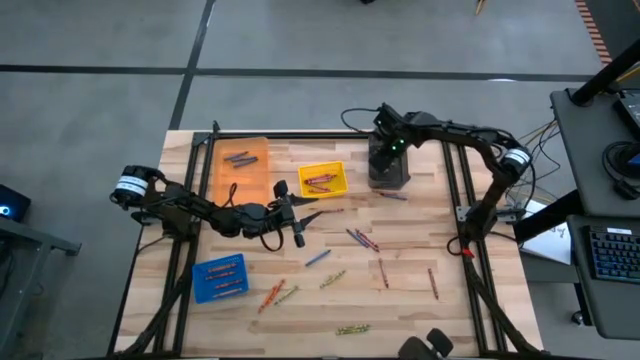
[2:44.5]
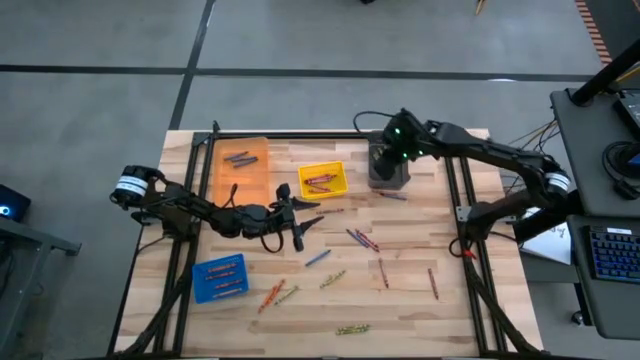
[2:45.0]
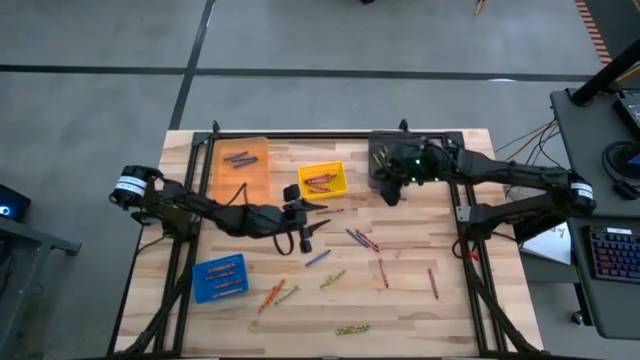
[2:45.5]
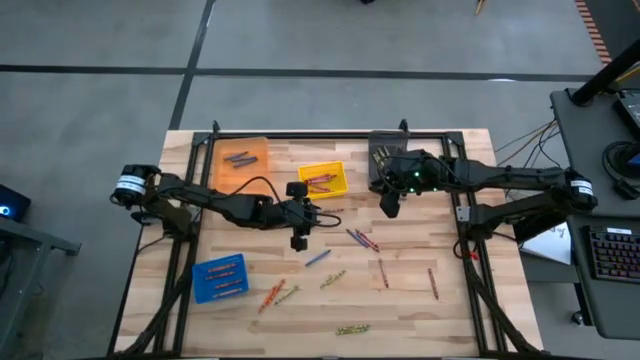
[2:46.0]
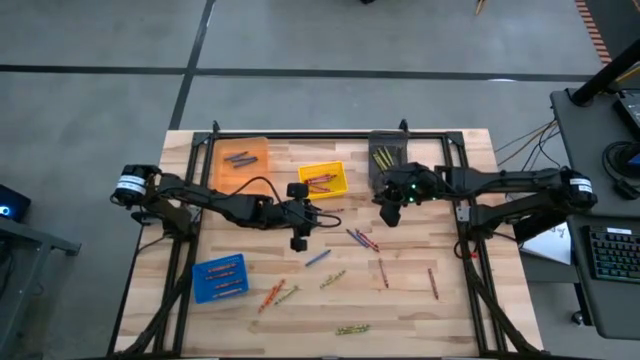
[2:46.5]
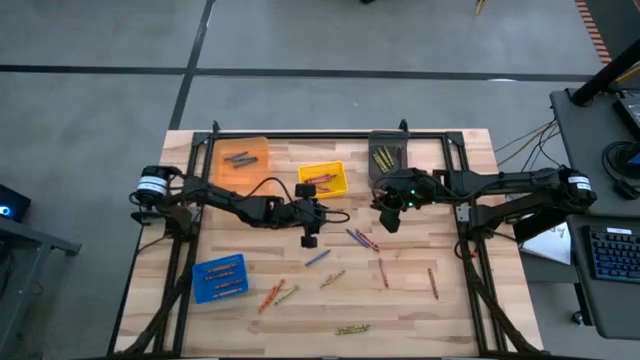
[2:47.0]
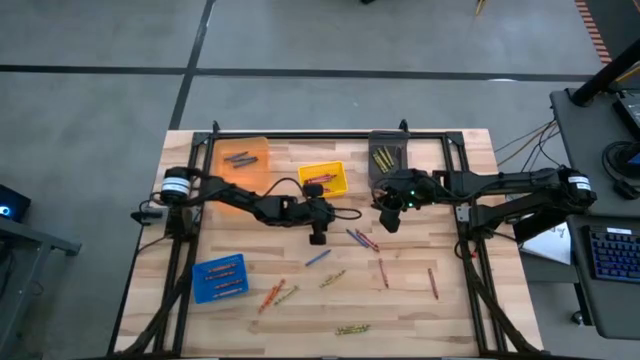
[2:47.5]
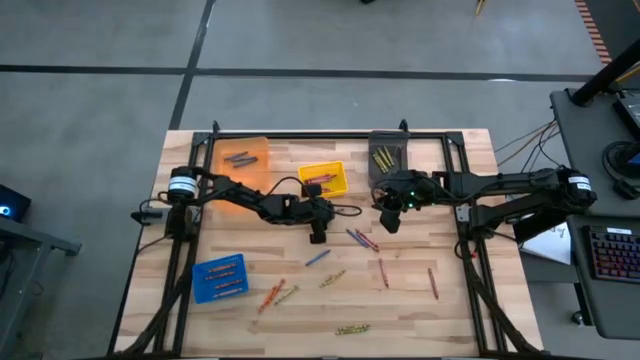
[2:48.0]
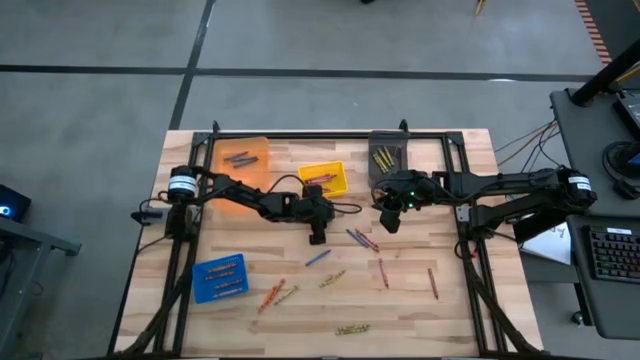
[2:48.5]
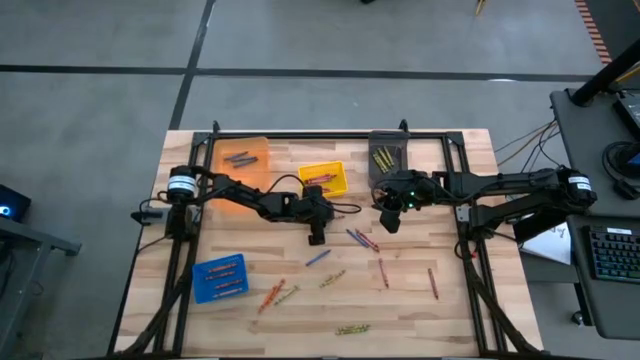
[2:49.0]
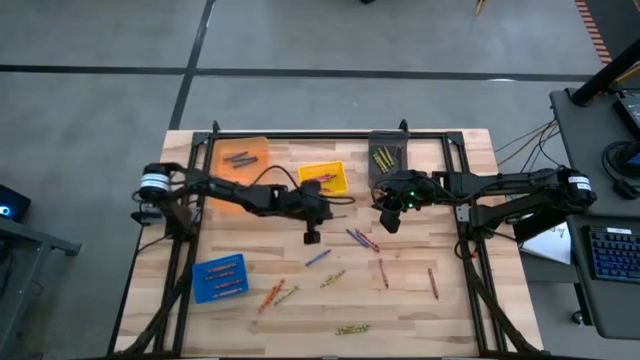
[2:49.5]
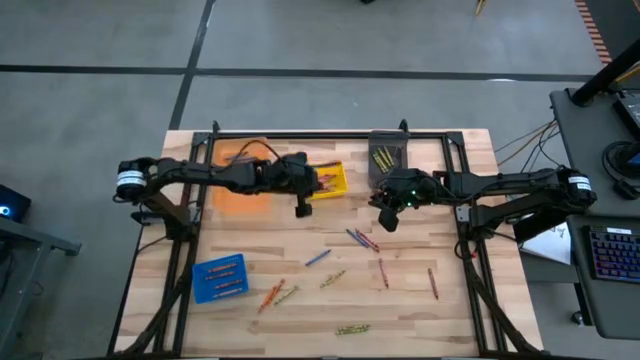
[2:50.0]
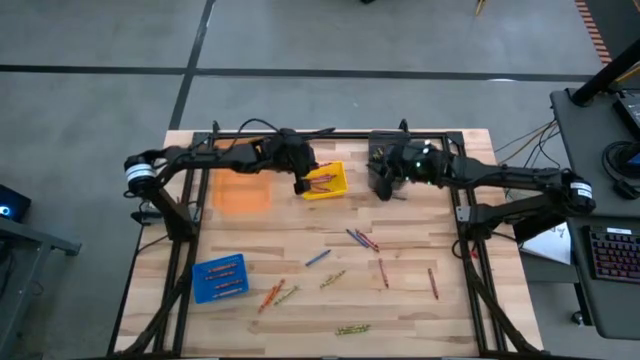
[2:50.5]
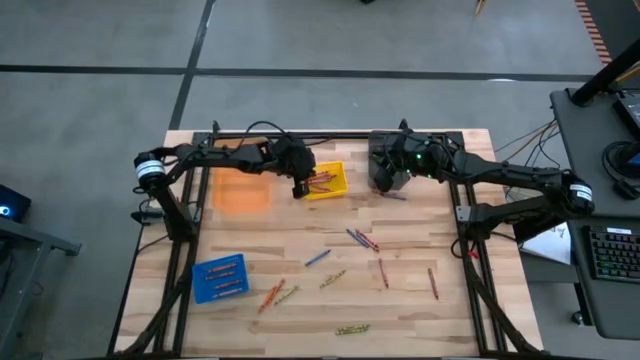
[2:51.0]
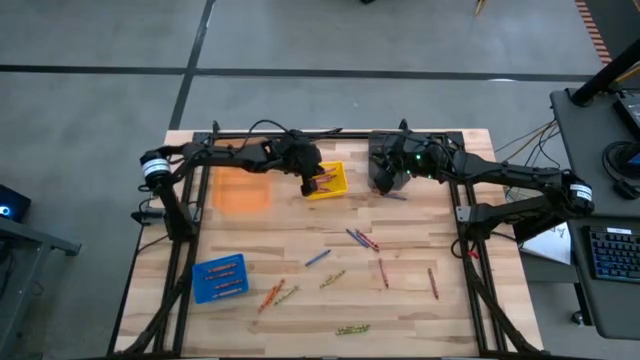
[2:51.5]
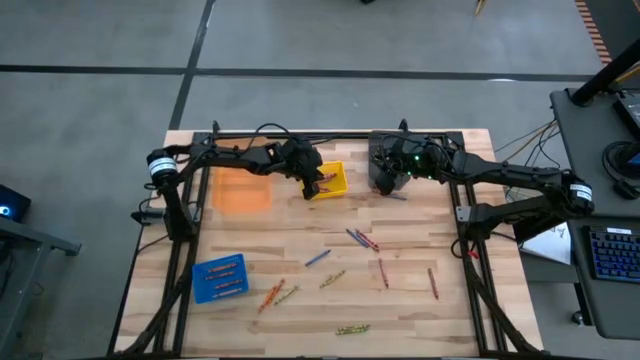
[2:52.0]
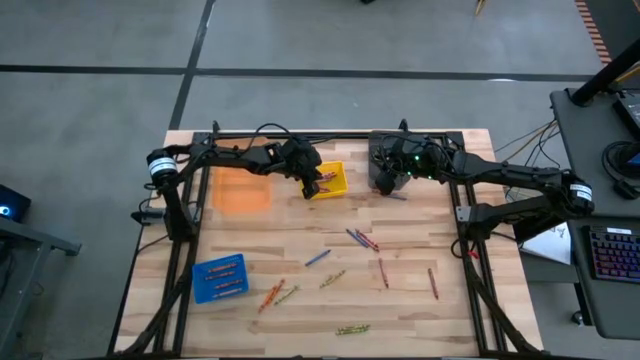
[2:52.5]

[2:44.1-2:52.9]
Task: Sort crayons
Put the red crayon into the yellow bin

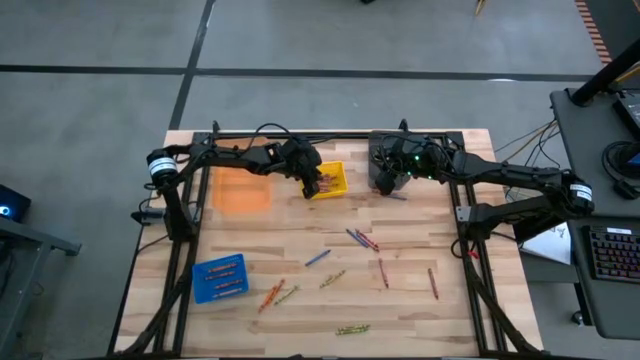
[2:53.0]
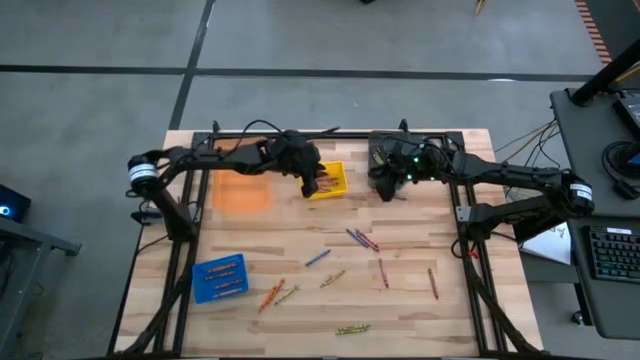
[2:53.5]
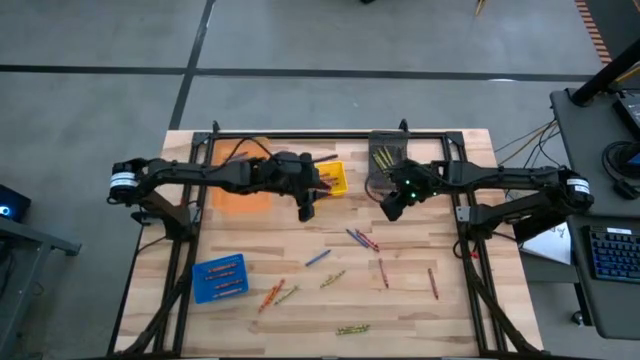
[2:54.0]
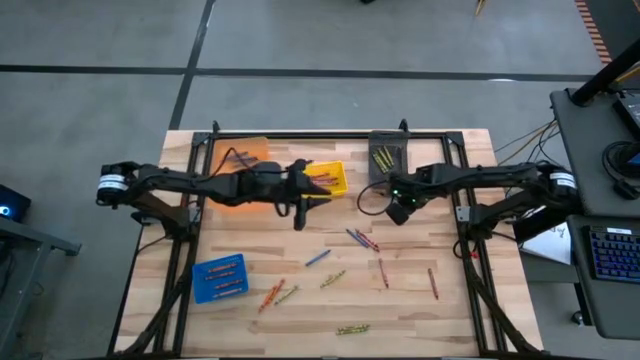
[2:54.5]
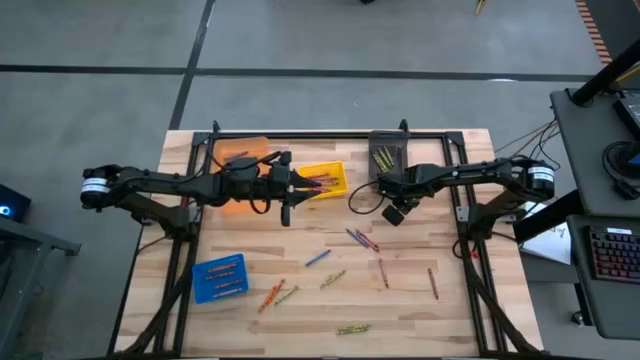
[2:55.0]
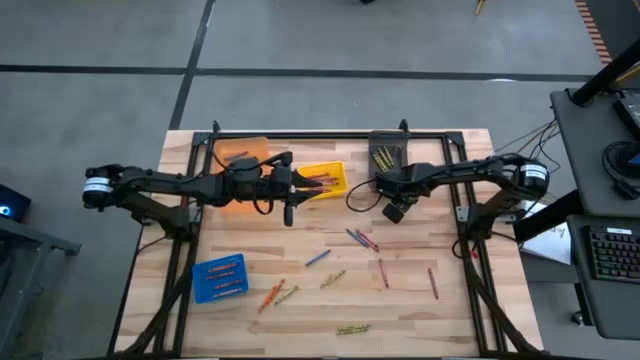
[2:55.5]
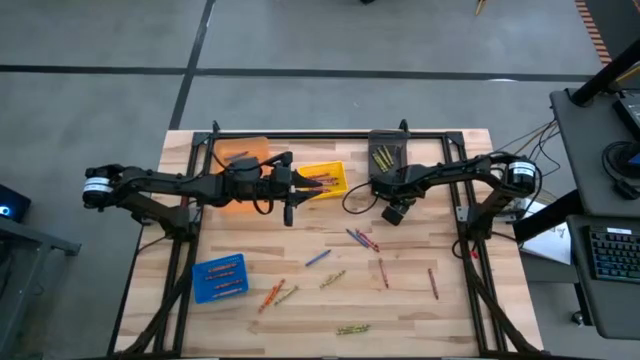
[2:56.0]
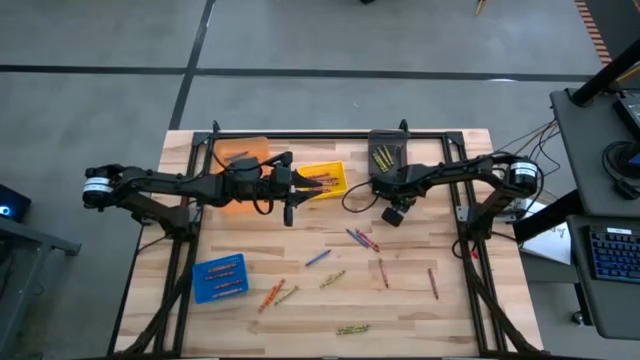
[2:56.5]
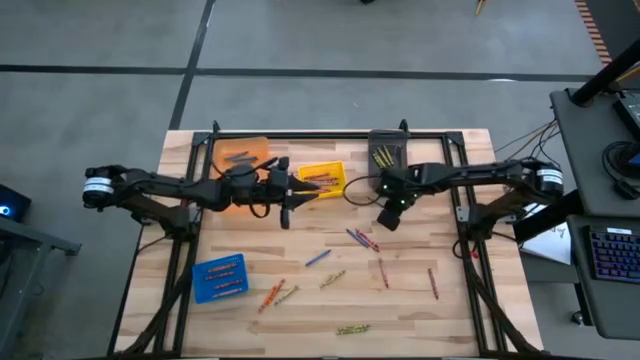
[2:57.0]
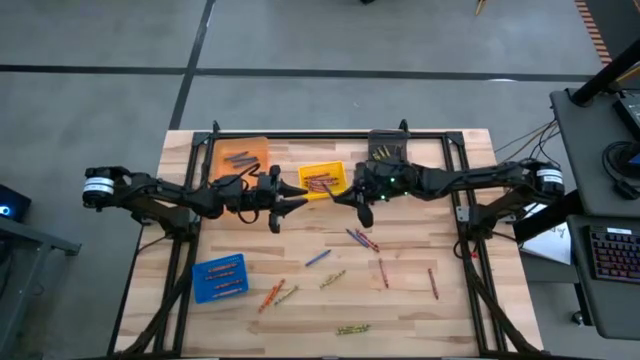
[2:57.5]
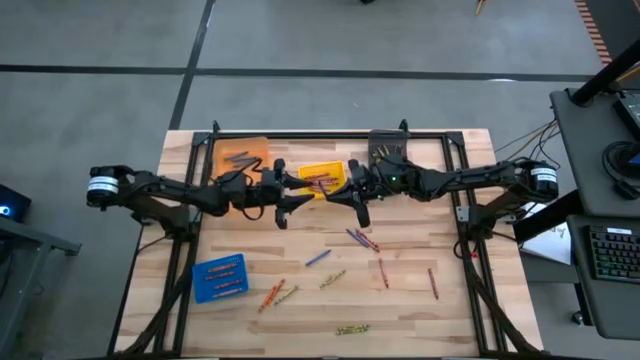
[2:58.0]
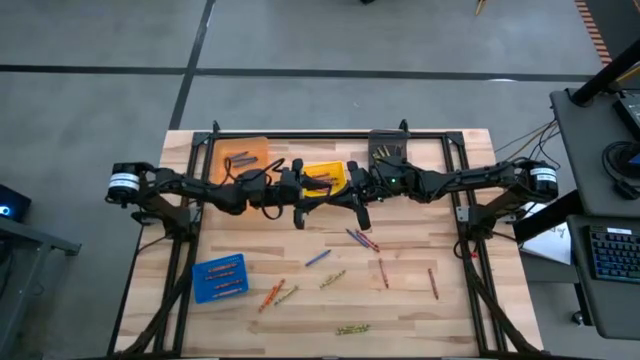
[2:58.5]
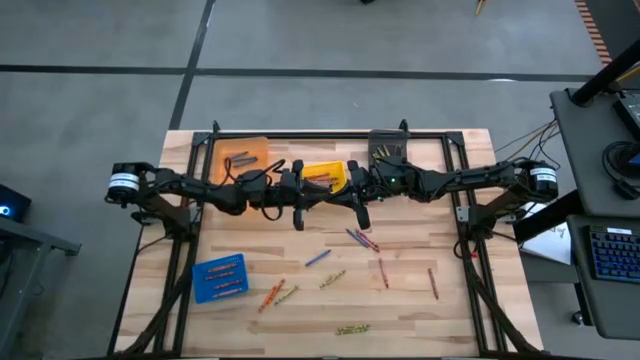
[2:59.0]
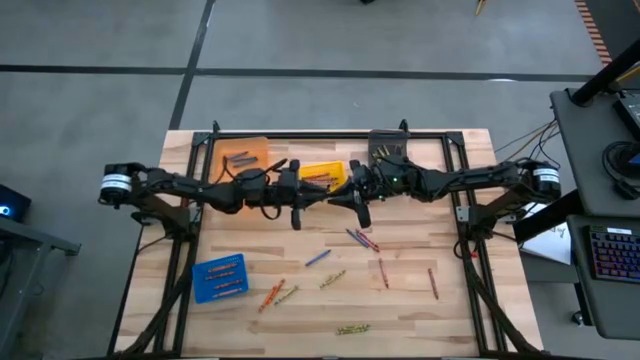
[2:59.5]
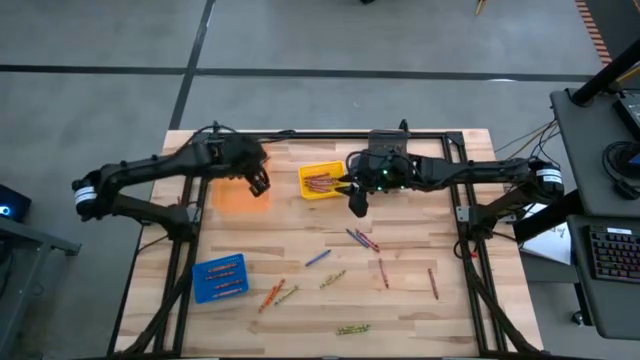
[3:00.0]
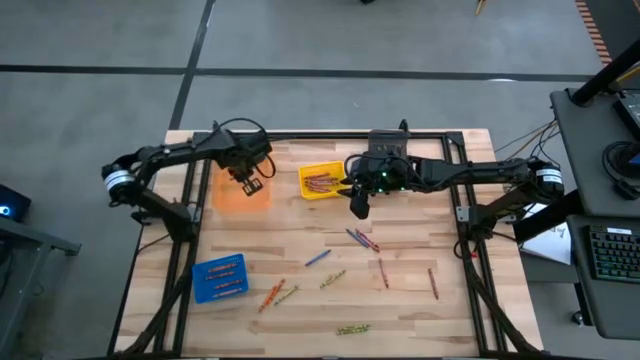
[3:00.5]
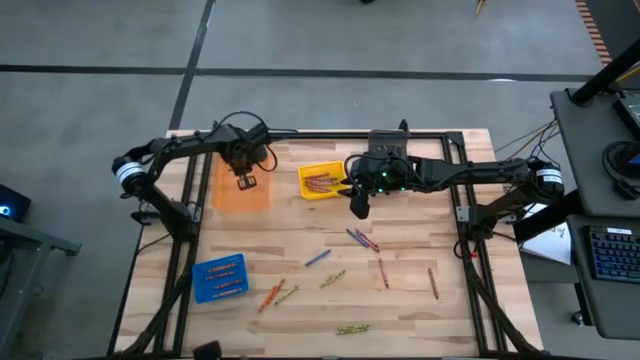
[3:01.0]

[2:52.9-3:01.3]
Put the blue crayon into the orange bin

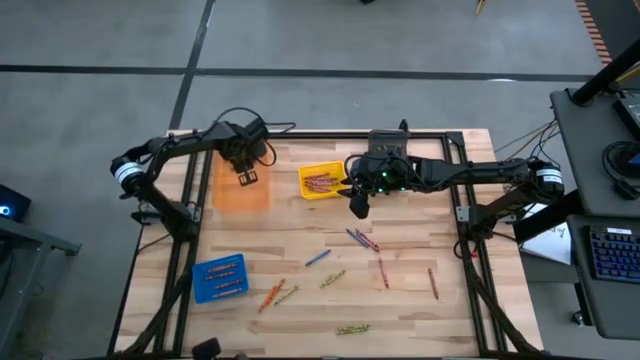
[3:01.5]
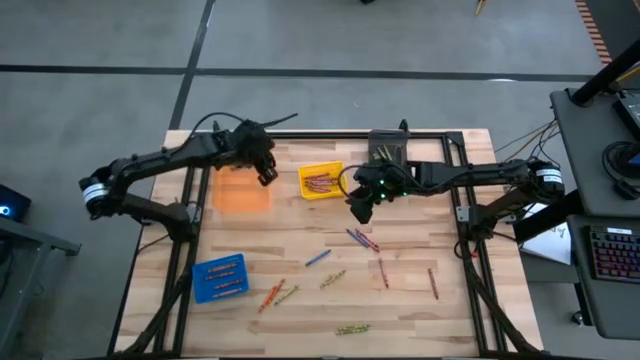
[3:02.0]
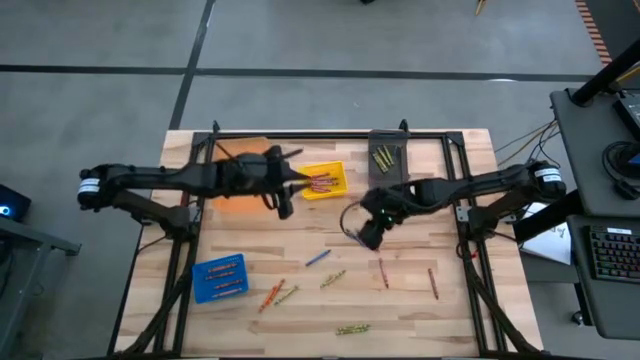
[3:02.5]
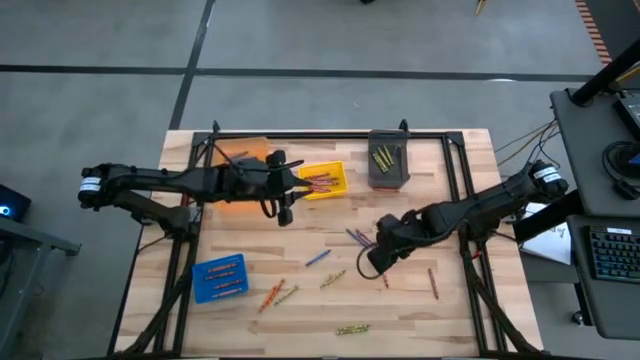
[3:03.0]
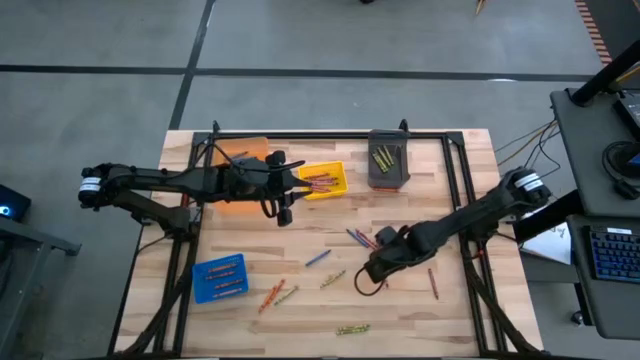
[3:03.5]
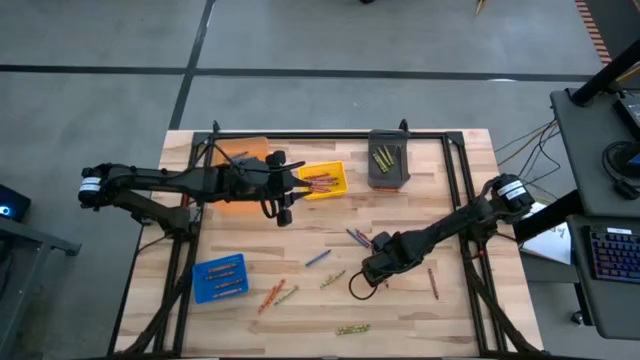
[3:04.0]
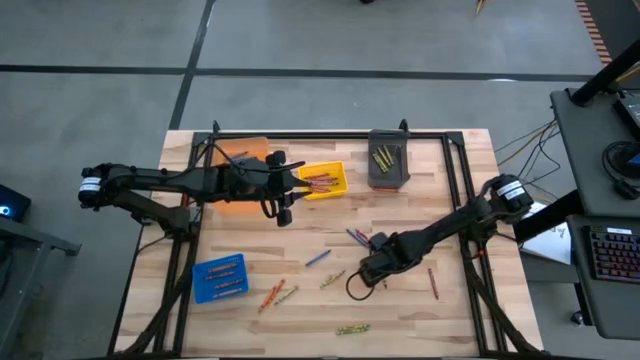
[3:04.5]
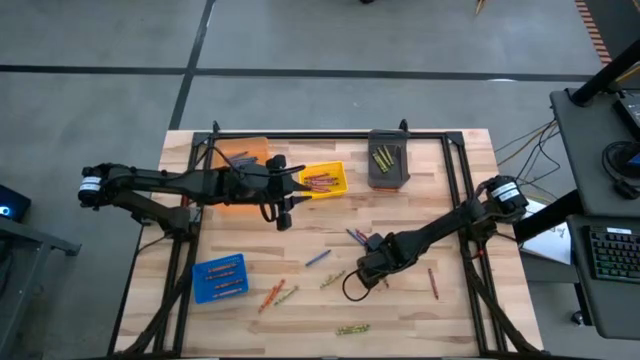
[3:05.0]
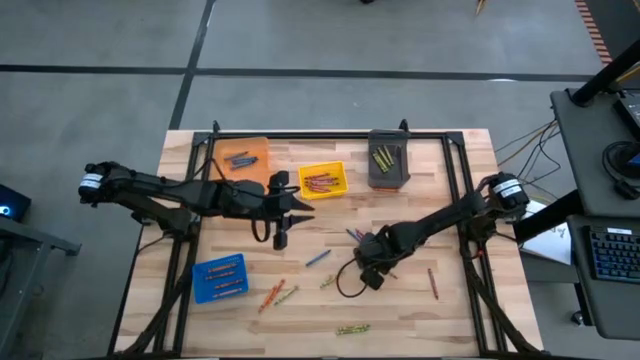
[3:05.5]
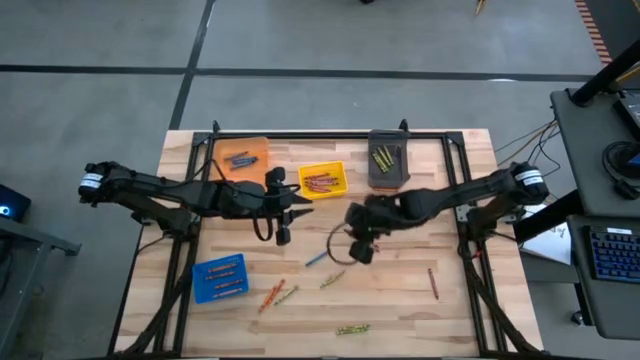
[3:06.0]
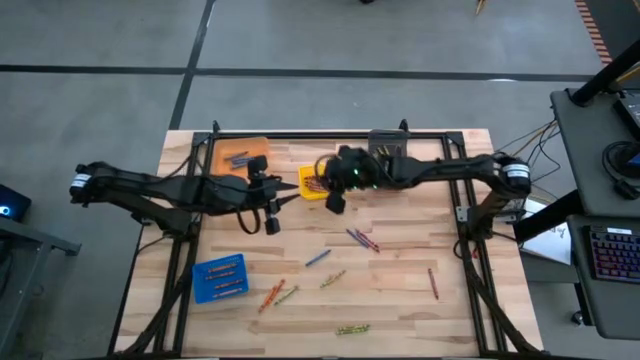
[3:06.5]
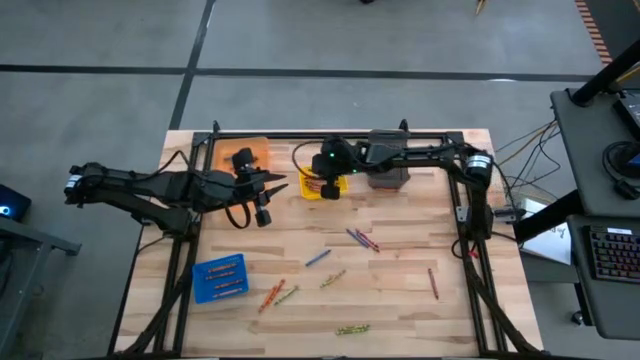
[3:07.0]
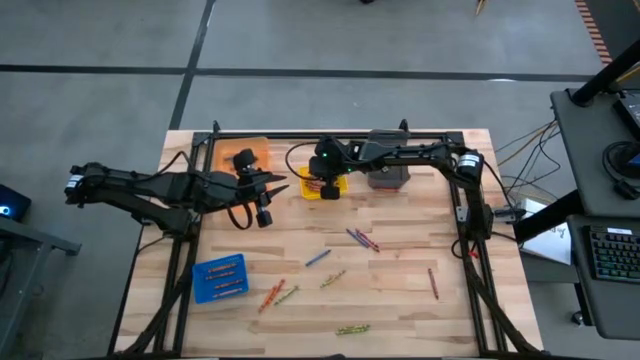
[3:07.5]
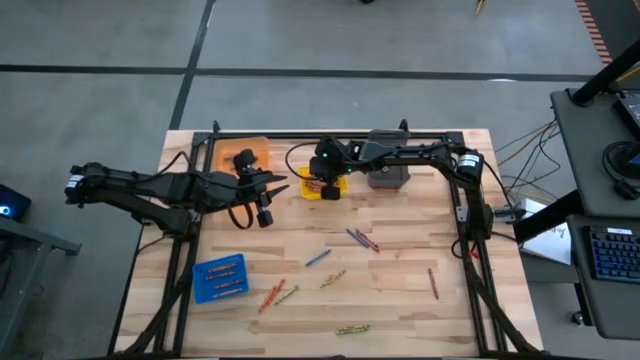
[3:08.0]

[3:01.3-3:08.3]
Put the red crayon into the yellow bin
